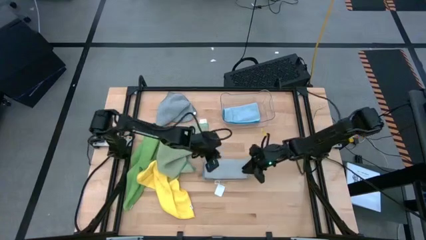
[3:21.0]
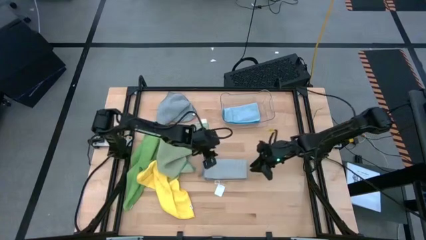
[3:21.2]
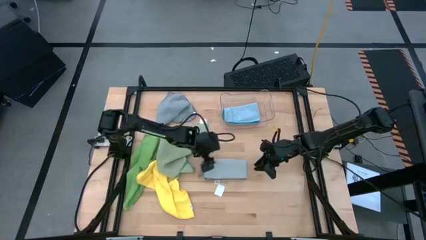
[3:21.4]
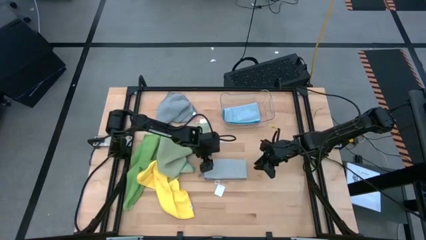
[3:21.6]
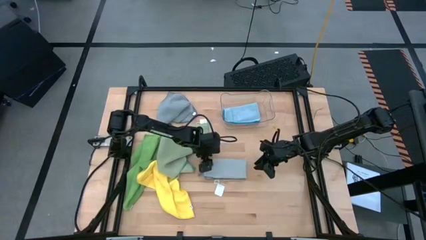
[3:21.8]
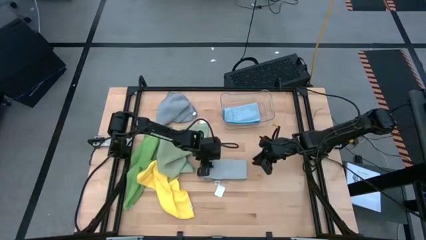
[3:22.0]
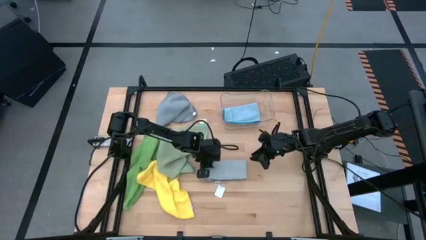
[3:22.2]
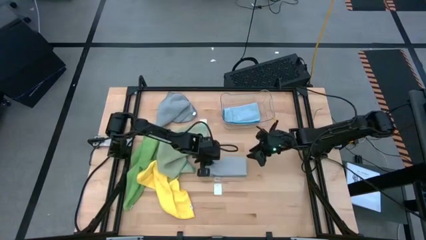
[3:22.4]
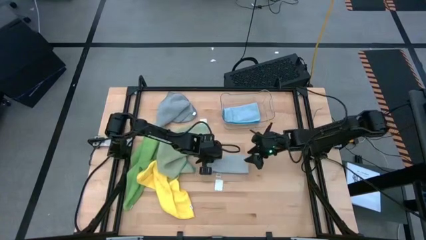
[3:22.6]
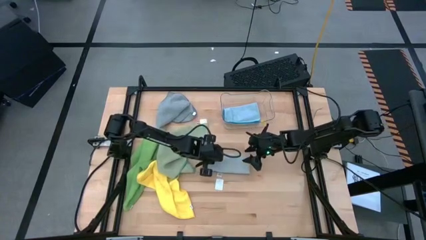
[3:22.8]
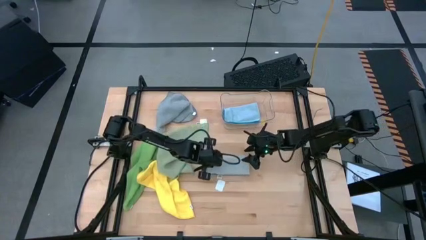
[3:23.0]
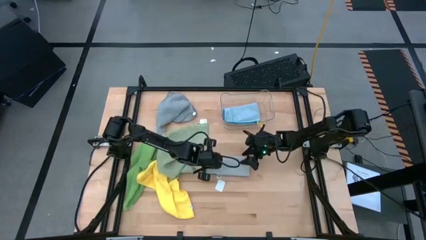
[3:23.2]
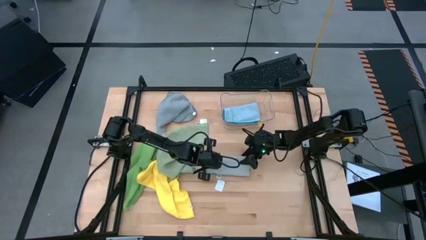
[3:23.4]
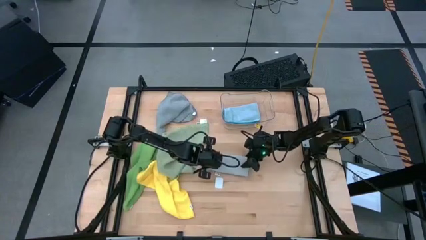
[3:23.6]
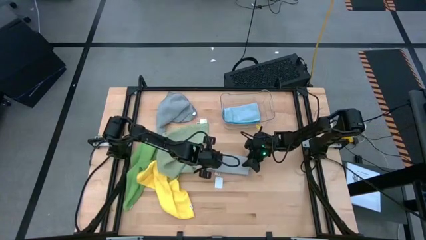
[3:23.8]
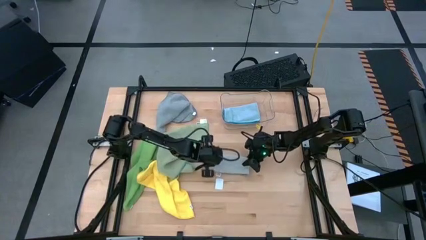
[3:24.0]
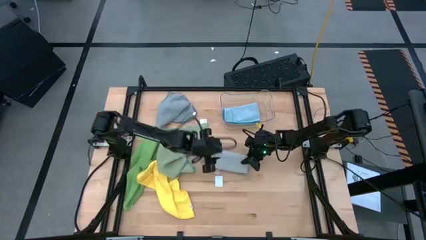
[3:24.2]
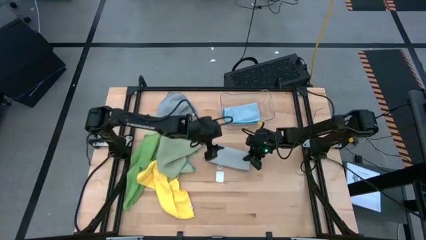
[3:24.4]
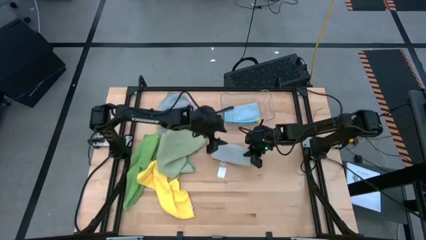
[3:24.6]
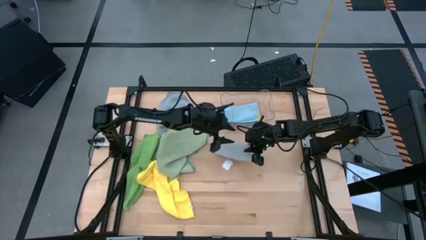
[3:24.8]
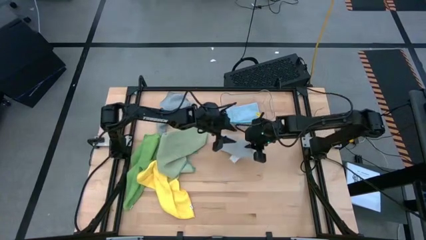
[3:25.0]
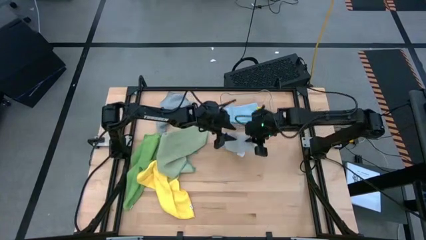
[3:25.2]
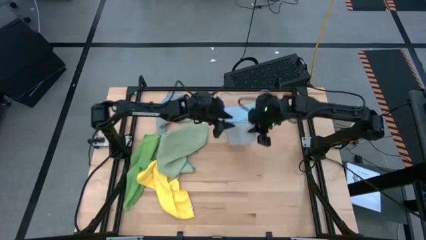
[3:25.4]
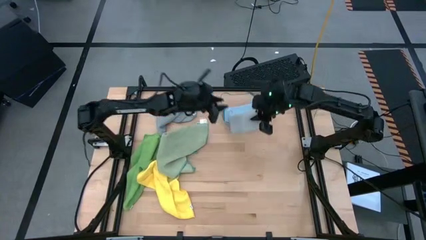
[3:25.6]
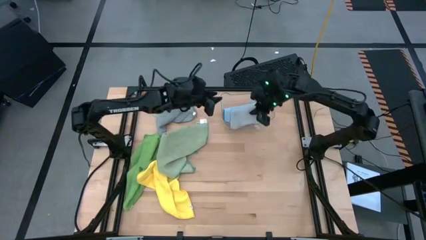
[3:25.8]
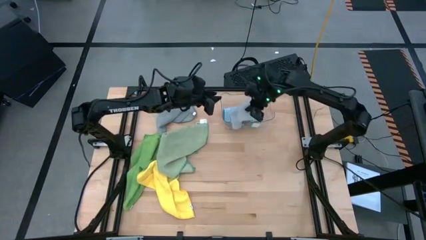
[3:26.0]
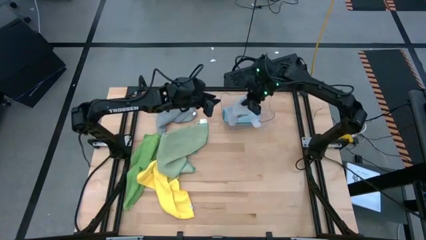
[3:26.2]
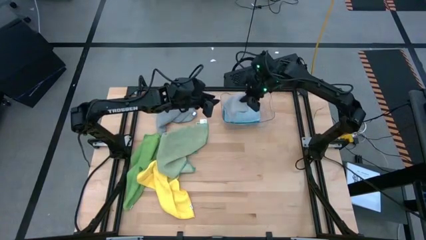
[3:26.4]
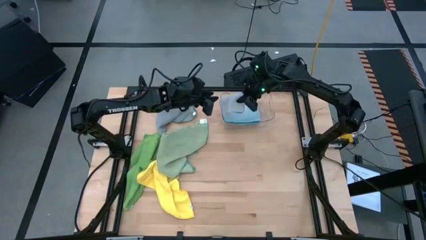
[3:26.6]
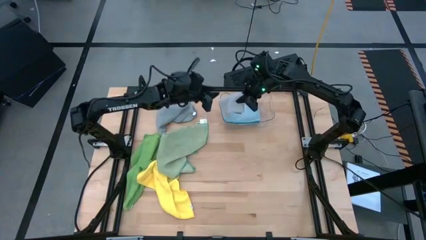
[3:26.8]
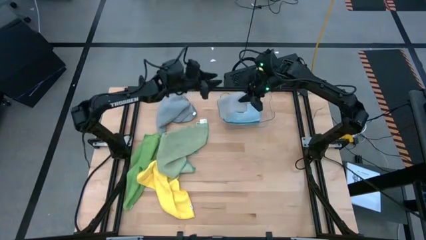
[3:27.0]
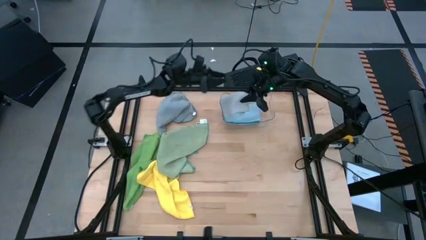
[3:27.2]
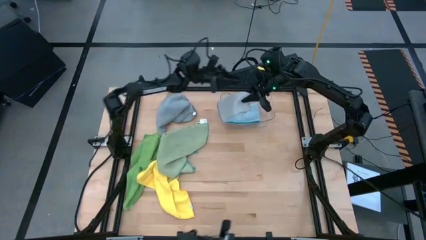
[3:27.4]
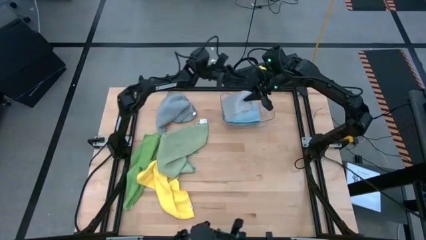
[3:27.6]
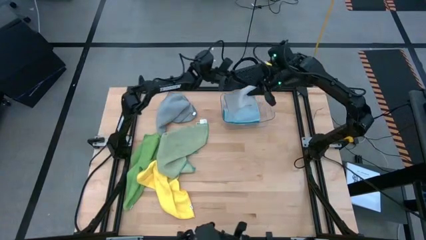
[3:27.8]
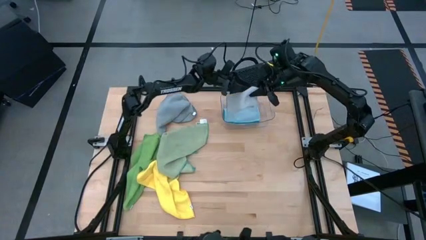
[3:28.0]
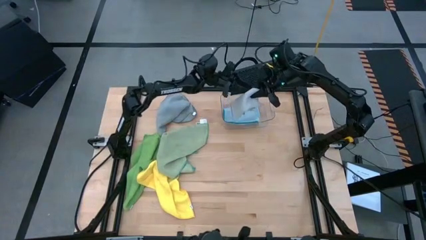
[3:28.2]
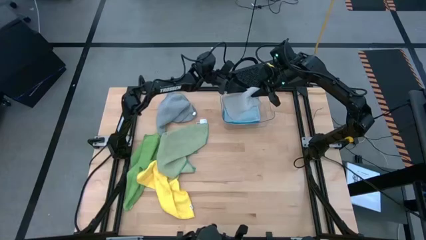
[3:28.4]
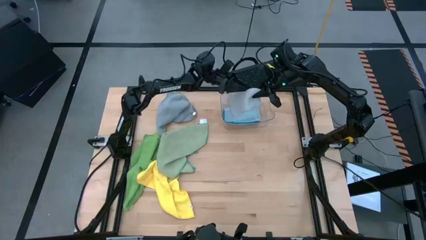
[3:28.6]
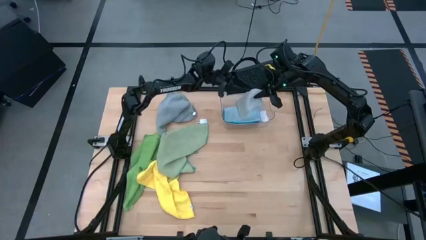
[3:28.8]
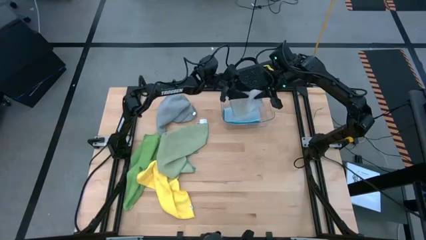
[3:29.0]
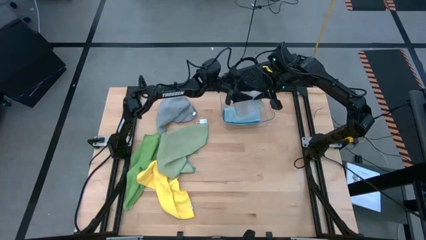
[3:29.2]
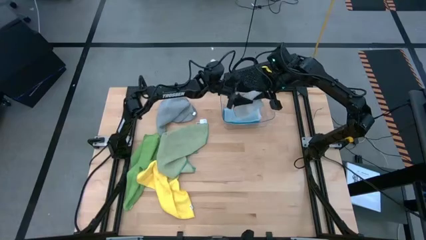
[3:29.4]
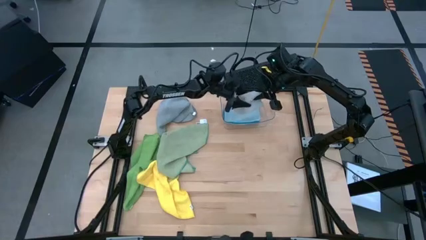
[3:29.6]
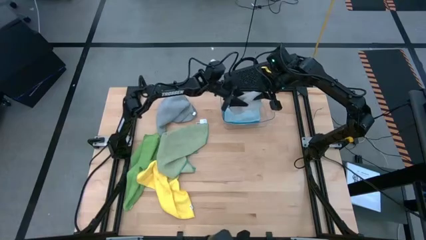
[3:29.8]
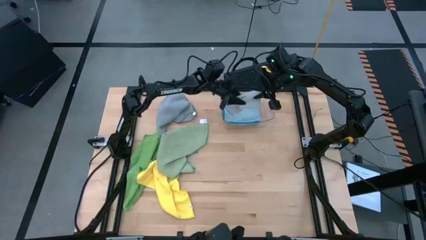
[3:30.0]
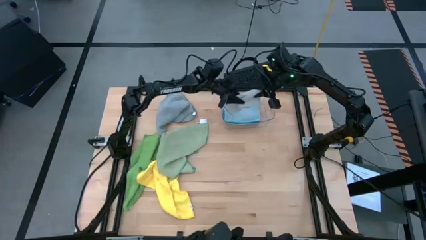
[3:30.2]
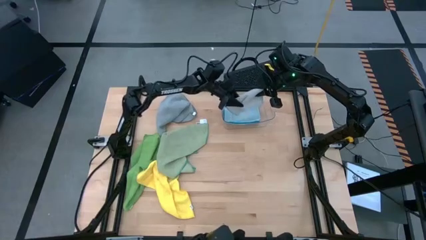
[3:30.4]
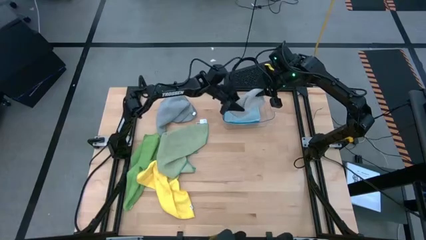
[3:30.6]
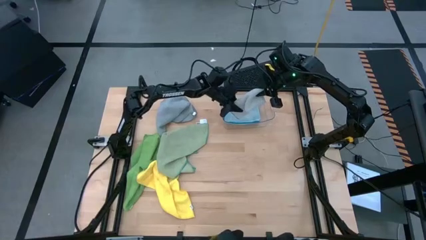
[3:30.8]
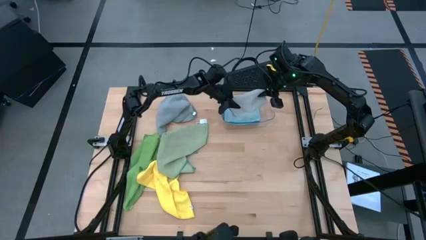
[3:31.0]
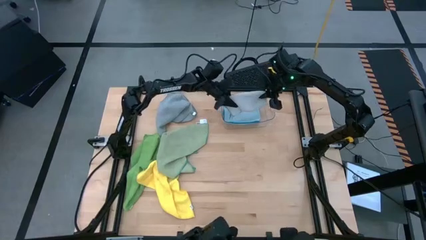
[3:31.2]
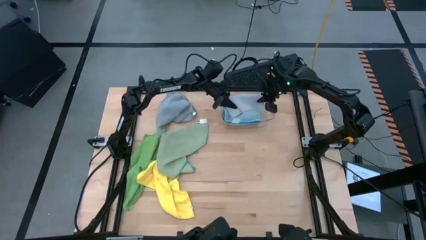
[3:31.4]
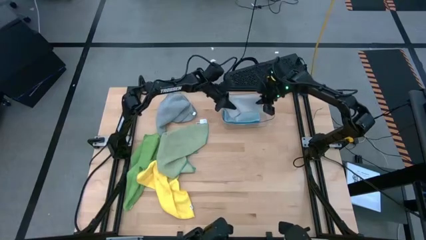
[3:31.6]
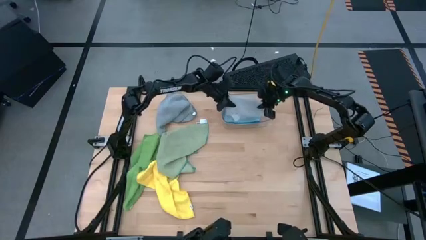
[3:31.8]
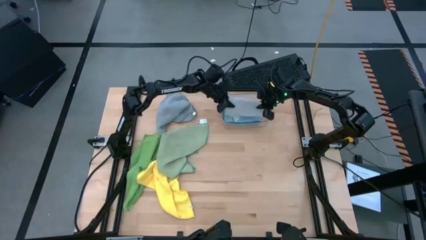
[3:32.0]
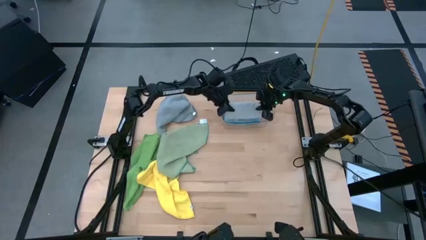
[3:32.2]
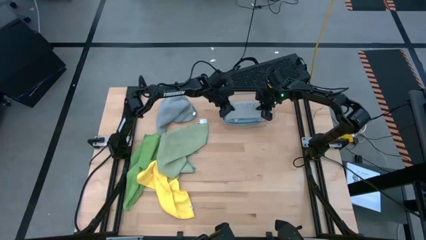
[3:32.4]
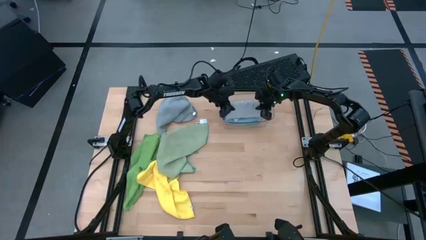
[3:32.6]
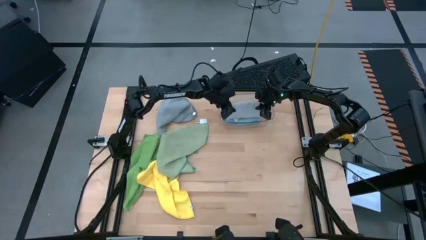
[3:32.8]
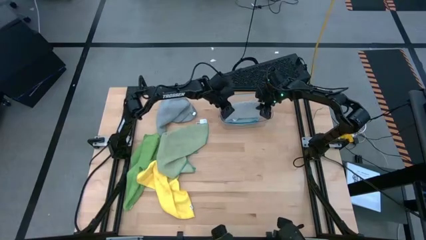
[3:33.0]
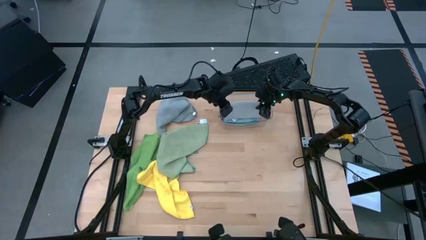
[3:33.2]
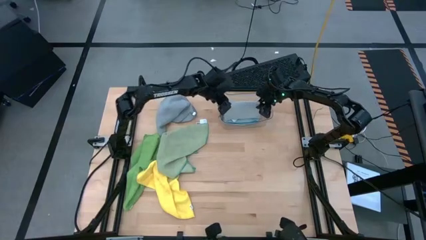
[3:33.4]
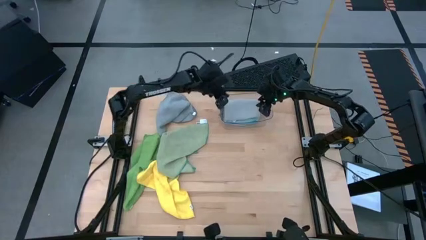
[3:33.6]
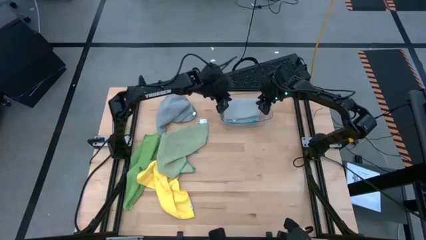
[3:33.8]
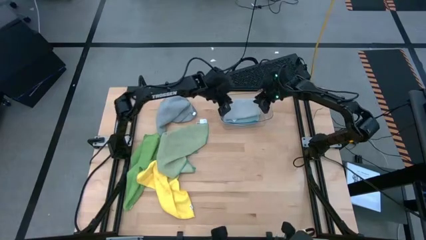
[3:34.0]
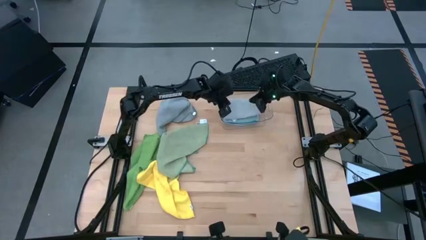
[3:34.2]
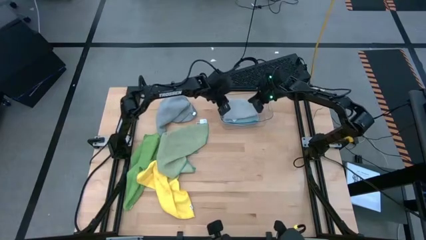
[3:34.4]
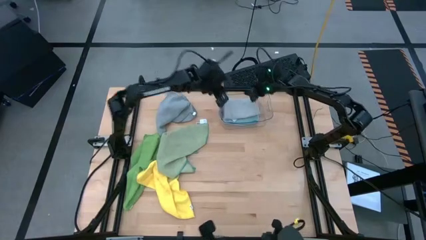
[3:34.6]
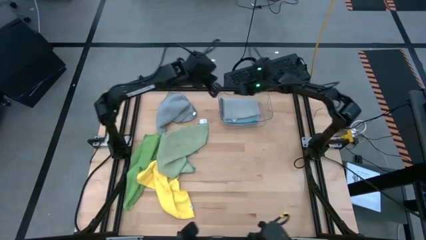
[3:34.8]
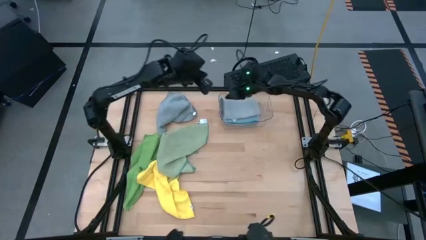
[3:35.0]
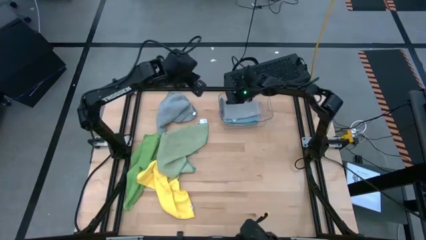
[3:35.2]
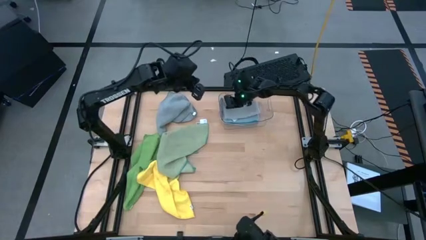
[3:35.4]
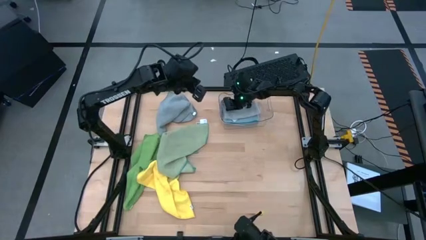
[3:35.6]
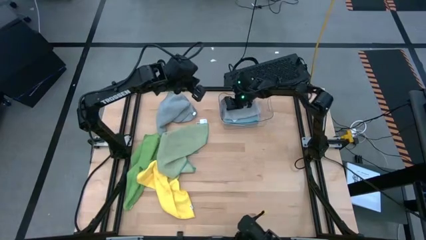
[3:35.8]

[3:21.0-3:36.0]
Task: Fold microfiber towels
Put the light gray towel in the transparent bin

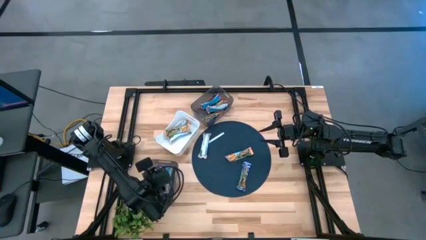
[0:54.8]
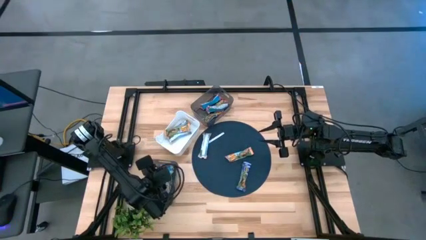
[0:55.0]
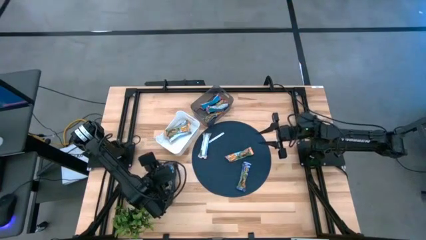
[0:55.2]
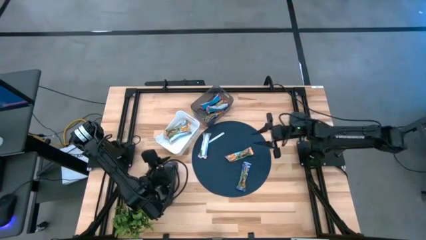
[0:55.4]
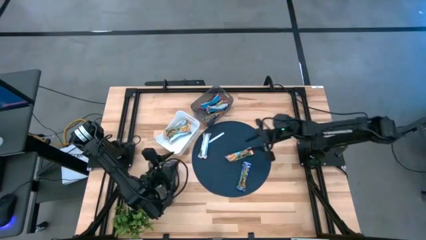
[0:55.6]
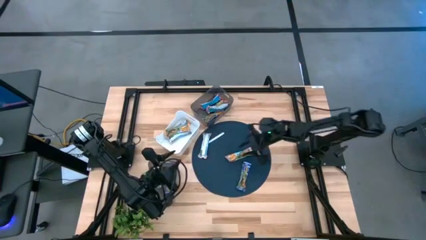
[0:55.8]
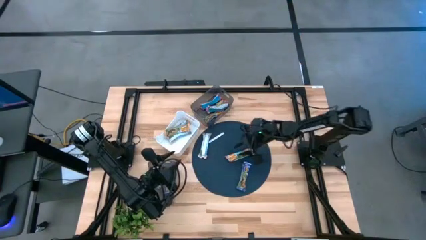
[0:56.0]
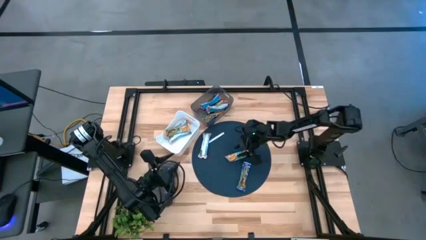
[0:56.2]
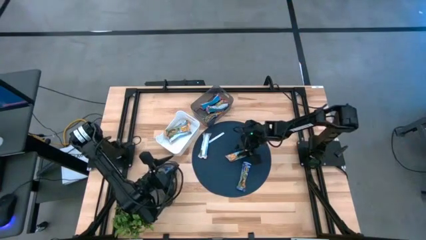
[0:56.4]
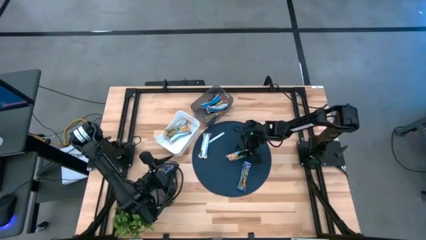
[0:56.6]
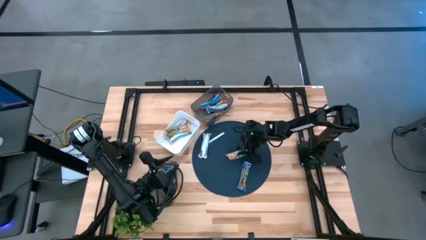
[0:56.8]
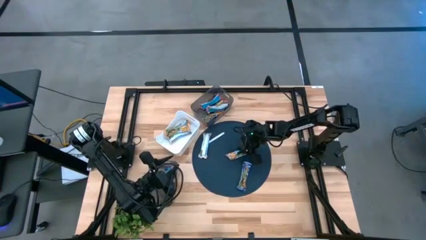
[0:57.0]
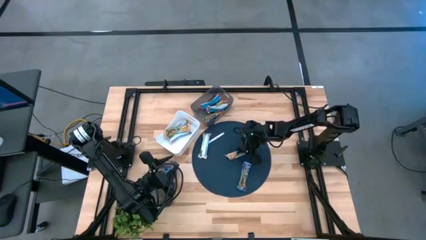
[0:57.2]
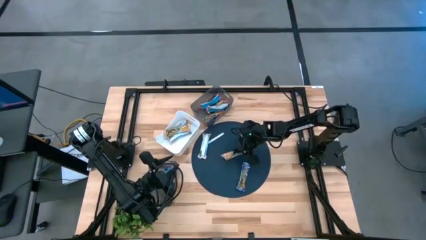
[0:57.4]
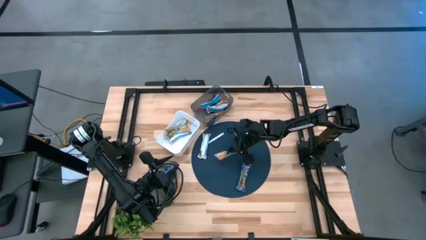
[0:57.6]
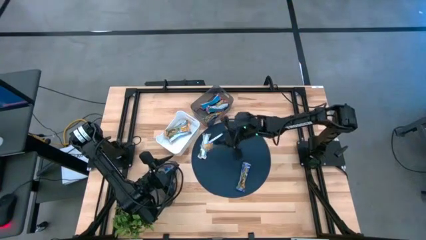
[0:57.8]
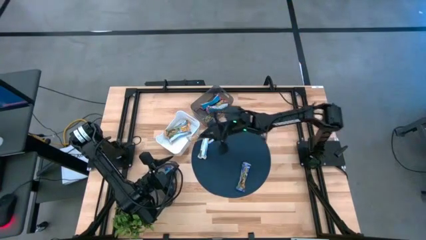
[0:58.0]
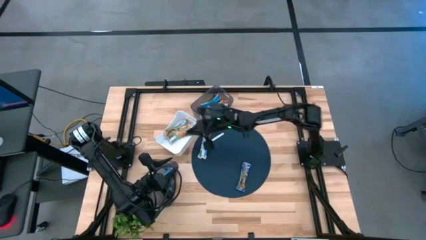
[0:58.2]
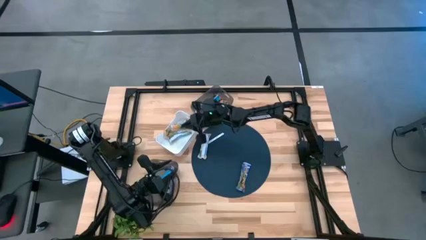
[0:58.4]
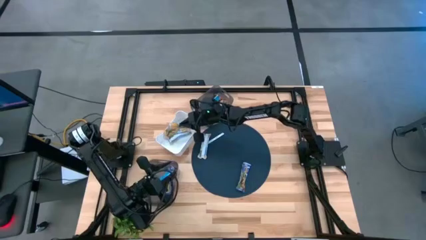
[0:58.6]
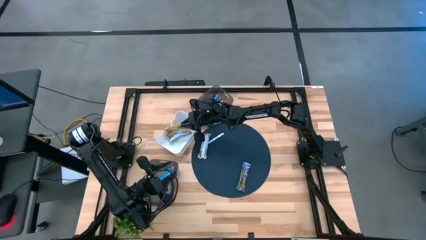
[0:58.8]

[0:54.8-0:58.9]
Task: Pick and place Granola Bars by type
Put the yellow granola bar into the white bin
